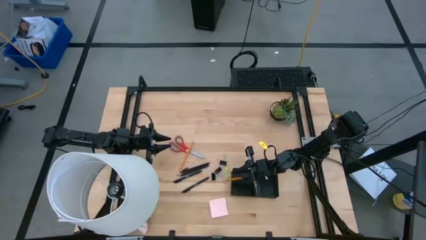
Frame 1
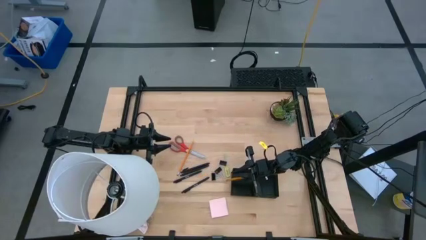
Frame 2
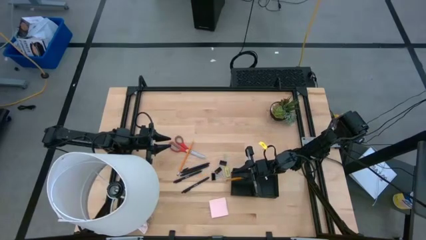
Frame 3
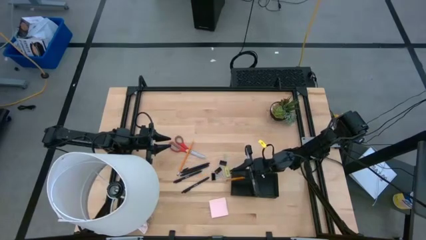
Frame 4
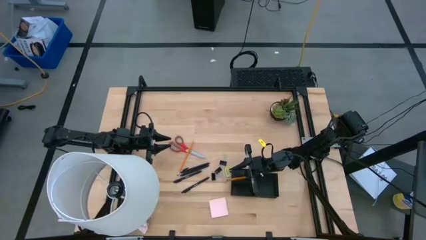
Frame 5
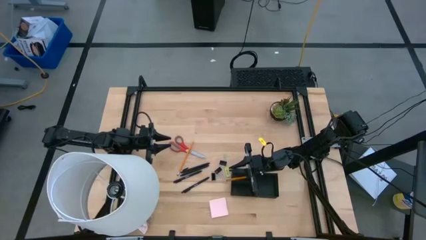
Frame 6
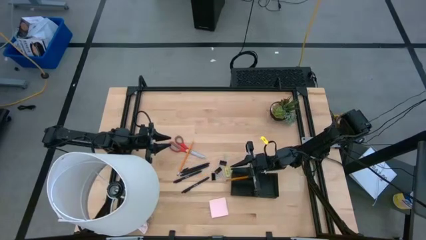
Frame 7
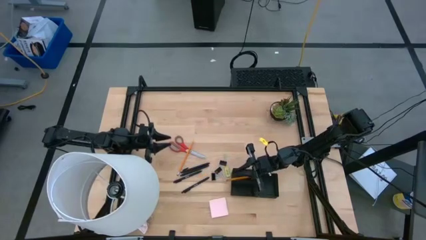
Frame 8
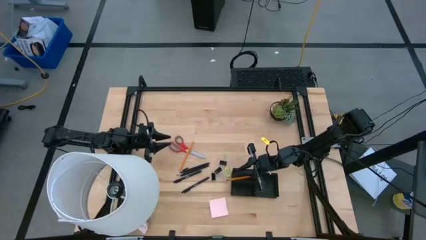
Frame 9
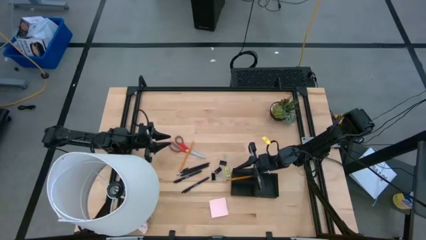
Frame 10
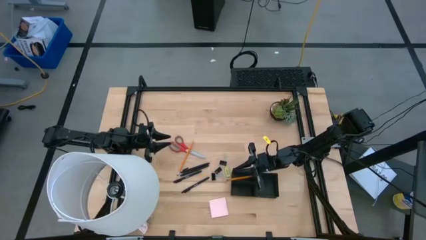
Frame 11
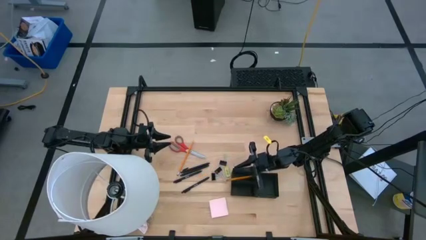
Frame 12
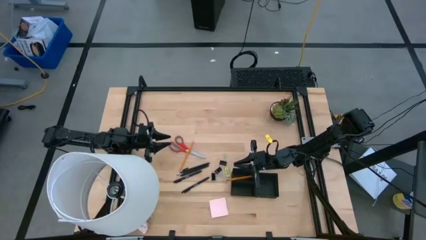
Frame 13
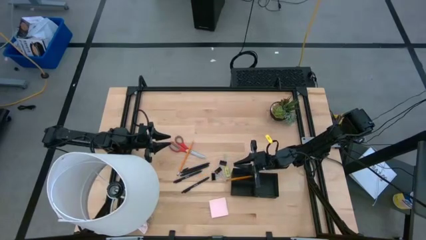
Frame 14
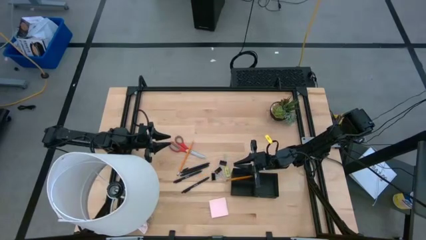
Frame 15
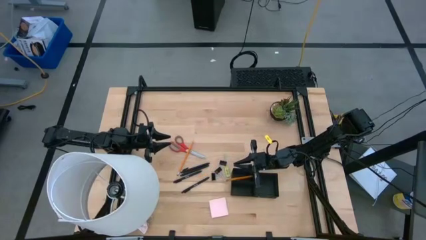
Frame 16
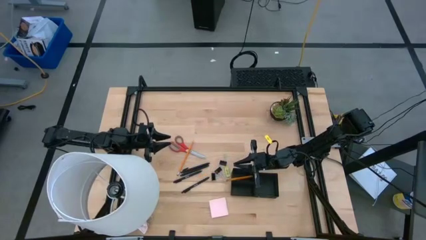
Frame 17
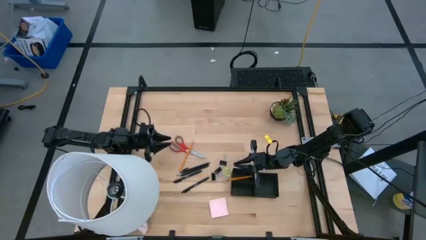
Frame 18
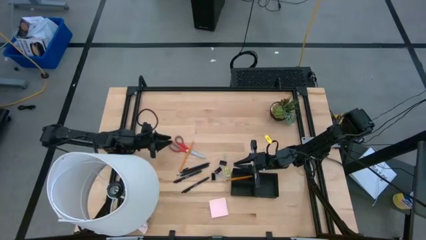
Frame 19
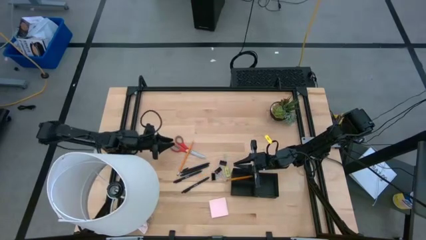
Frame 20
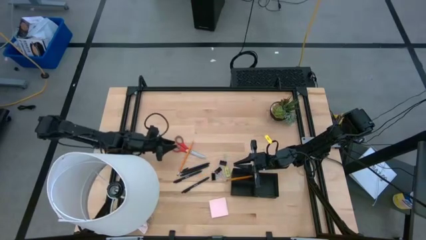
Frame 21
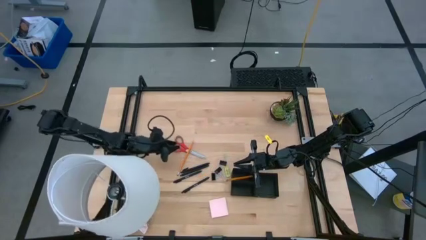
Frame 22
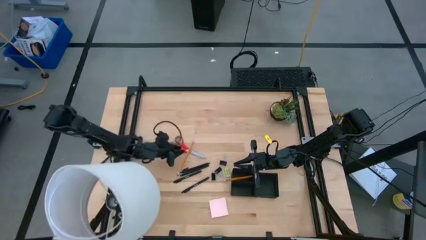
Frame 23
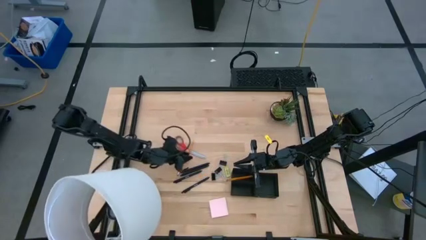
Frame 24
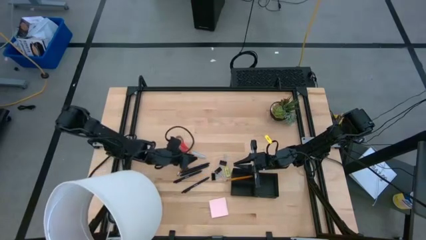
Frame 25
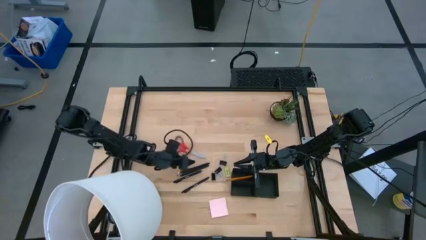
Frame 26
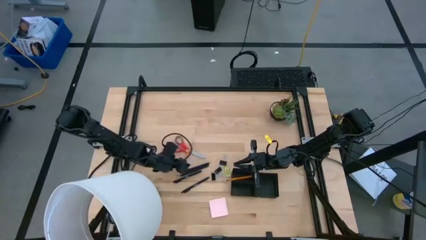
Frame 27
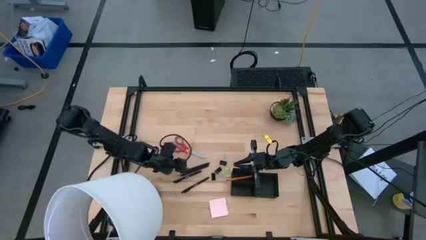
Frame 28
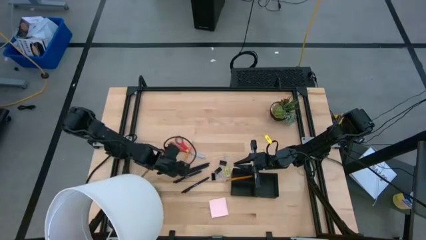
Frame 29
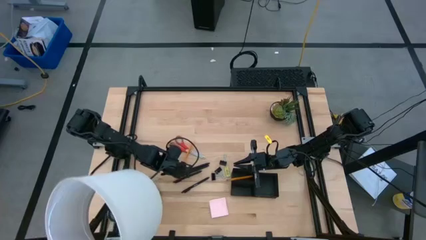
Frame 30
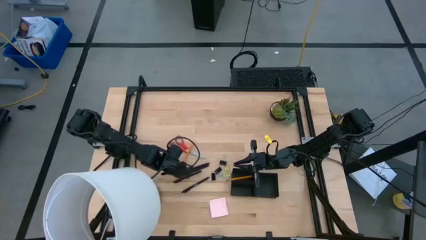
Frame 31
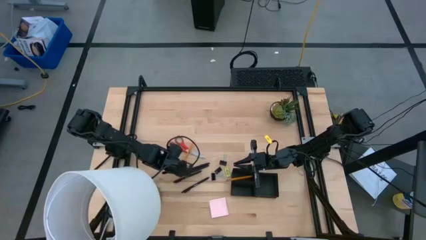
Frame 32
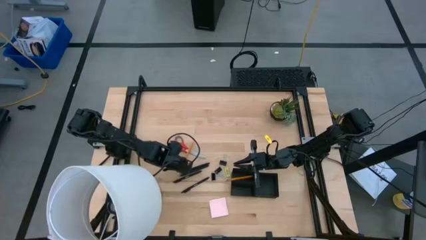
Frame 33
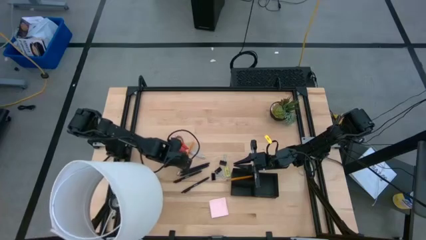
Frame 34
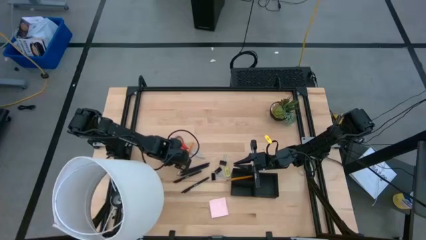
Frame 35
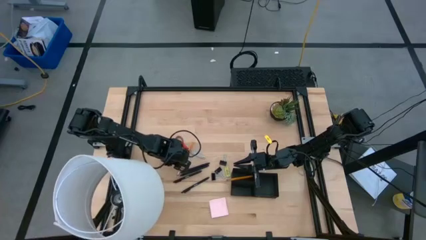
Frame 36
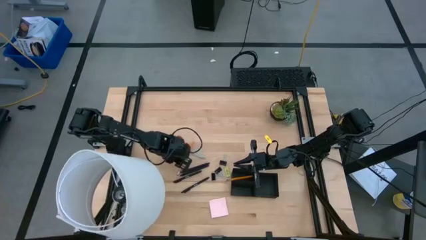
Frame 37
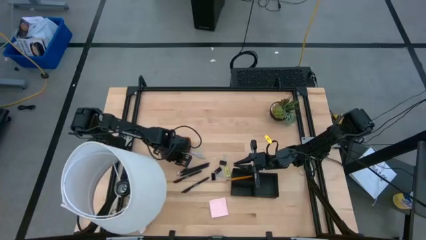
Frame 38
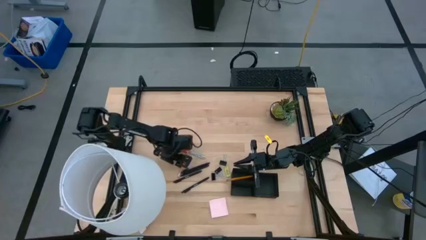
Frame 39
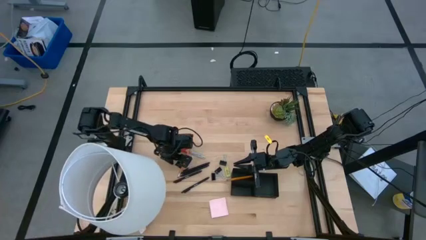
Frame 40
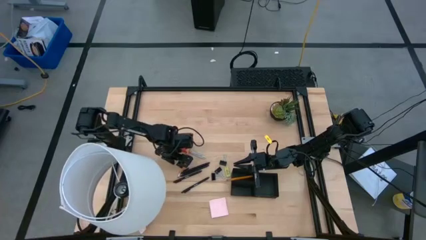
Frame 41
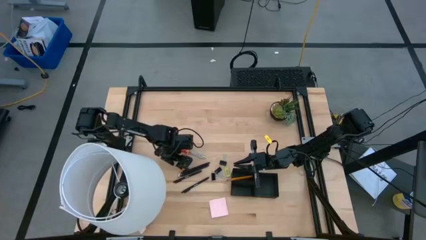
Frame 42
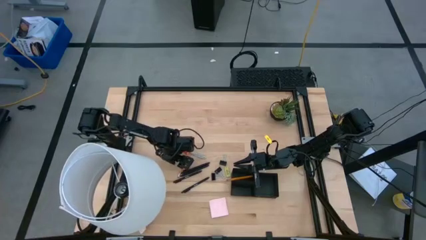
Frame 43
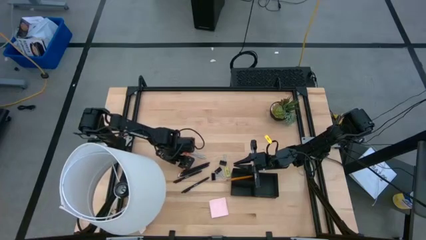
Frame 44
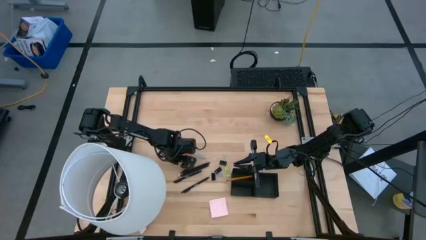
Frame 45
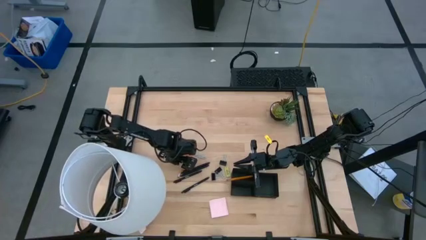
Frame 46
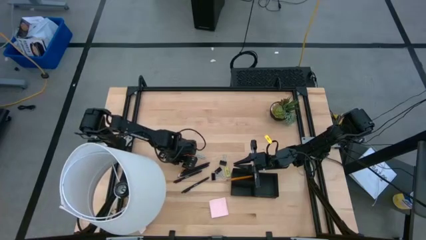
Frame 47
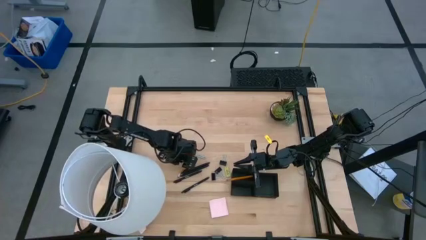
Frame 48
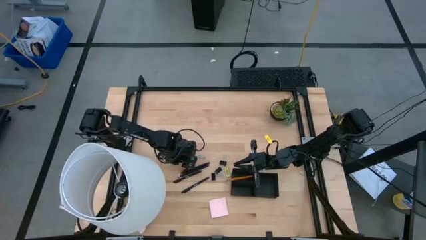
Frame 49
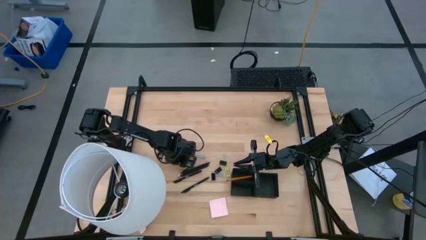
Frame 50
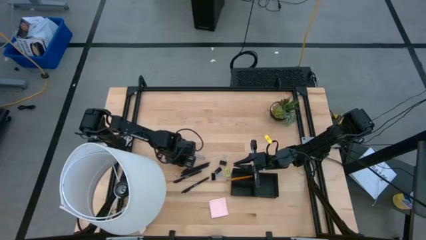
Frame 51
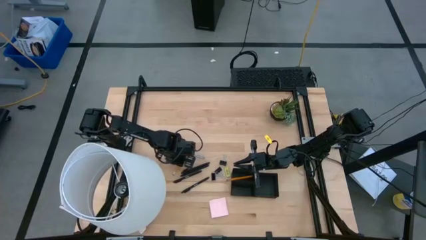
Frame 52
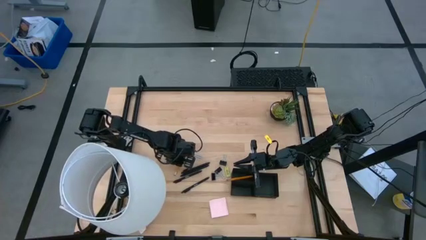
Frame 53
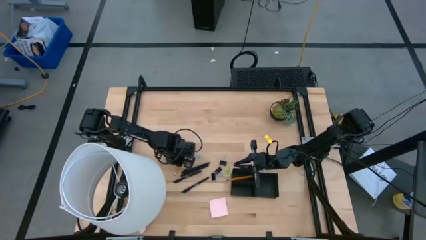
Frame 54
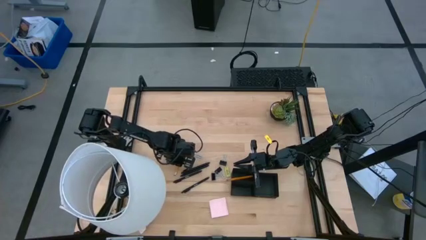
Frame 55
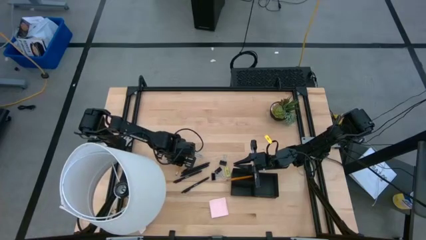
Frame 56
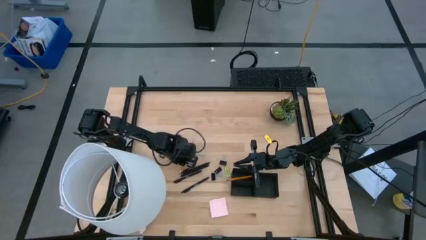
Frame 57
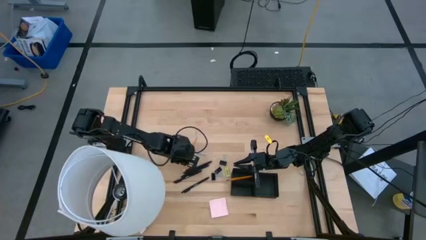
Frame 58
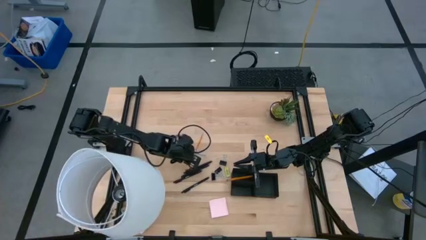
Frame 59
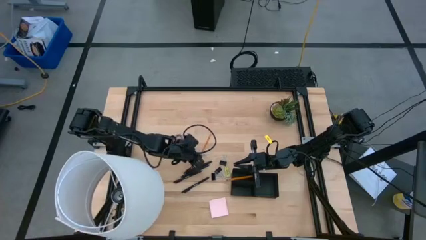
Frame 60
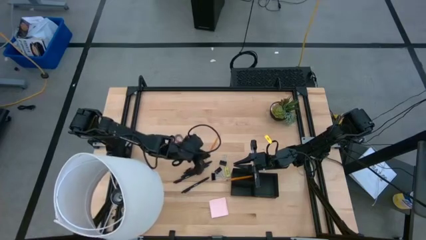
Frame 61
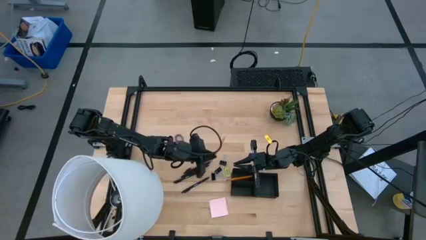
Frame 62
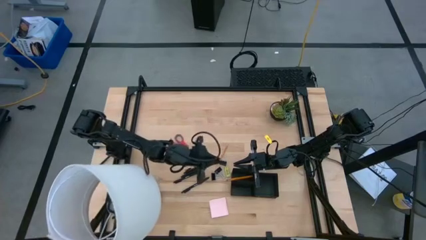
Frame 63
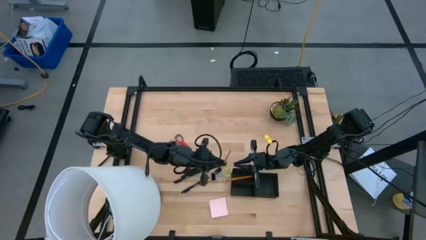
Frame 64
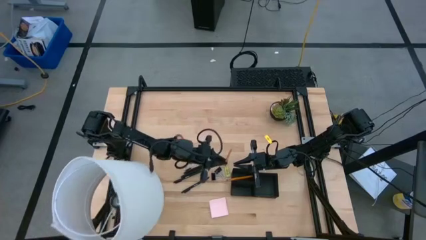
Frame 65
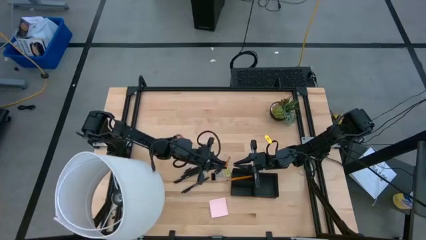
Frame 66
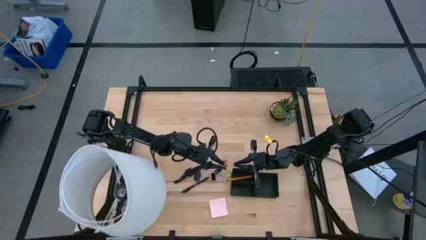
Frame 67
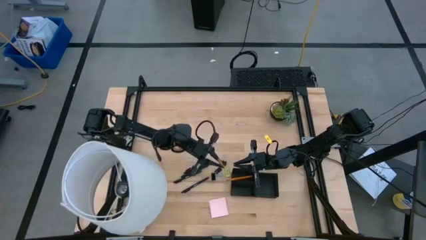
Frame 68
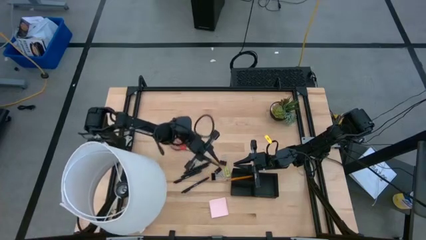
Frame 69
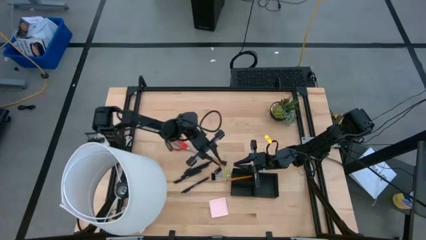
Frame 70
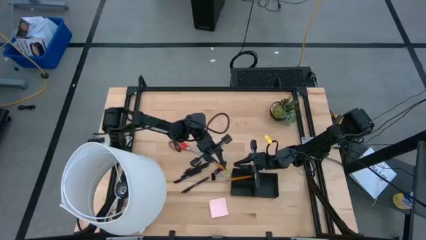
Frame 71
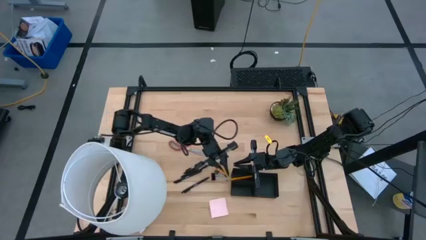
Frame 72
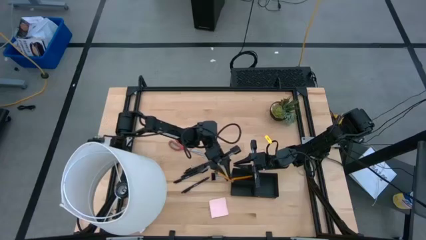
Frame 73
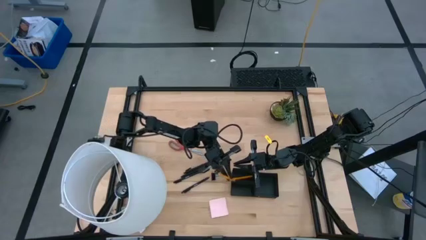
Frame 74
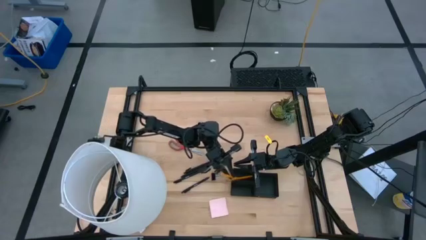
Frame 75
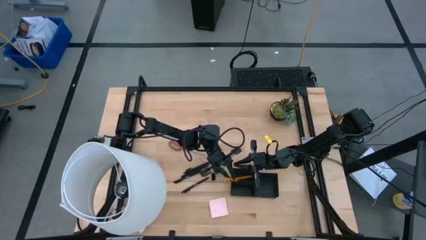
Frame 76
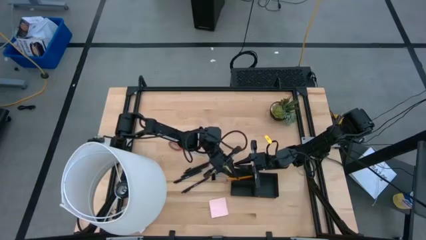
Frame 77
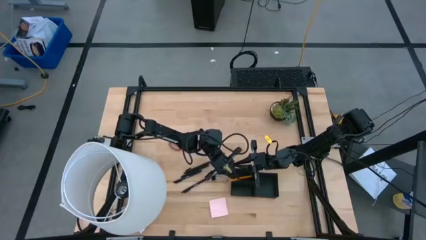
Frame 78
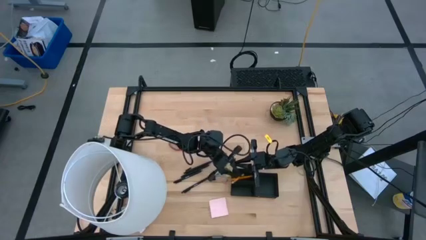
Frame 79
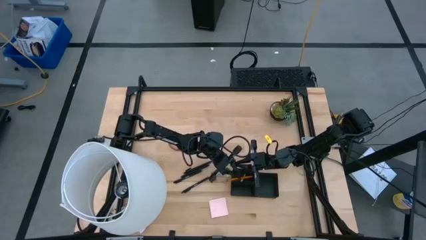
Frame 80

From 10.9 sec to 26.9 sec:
Task: Pick and place office supplies into organizer
Put the yellow pencil into the black desk organizer
